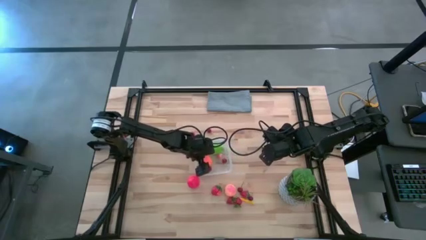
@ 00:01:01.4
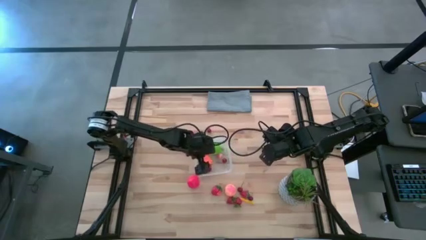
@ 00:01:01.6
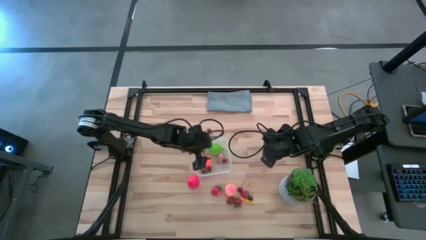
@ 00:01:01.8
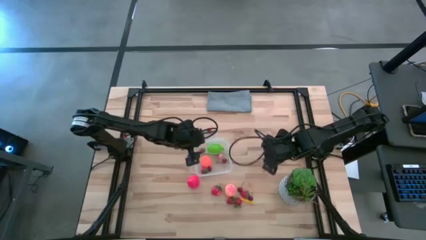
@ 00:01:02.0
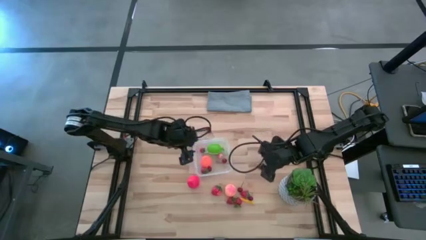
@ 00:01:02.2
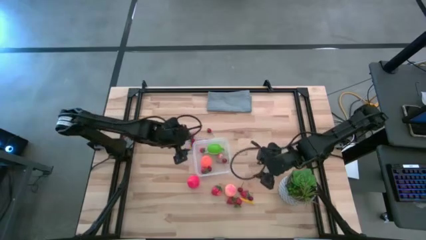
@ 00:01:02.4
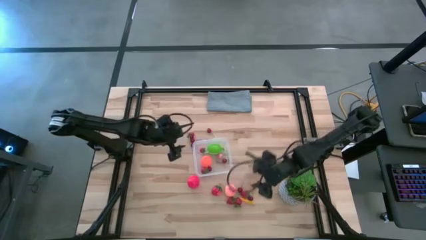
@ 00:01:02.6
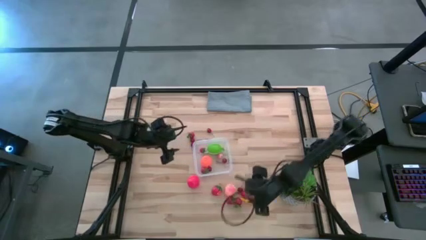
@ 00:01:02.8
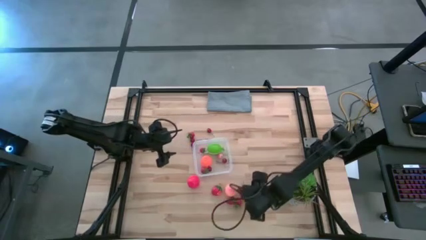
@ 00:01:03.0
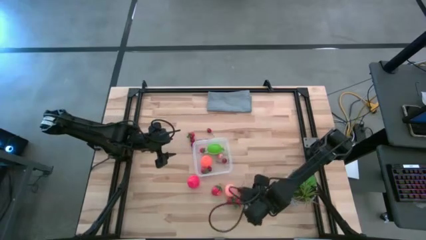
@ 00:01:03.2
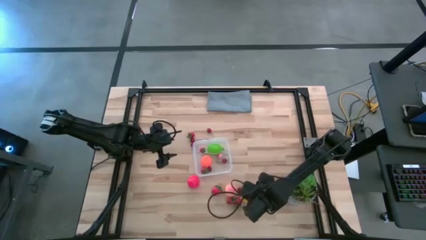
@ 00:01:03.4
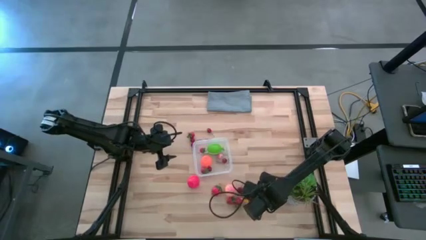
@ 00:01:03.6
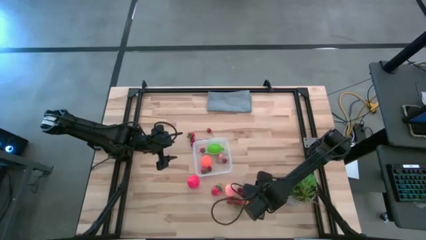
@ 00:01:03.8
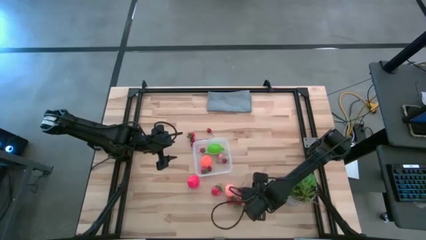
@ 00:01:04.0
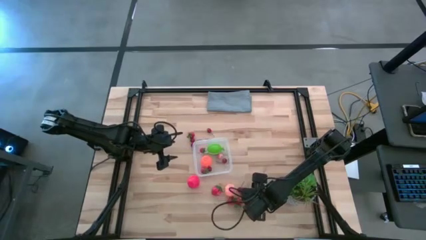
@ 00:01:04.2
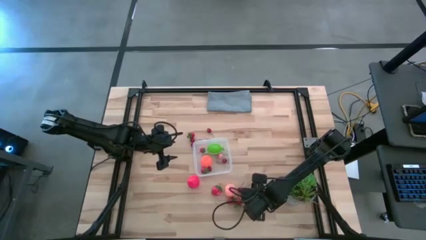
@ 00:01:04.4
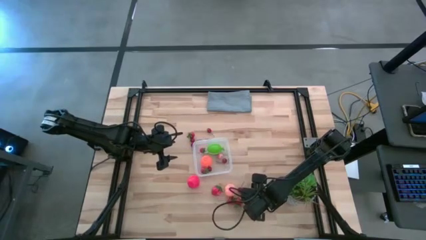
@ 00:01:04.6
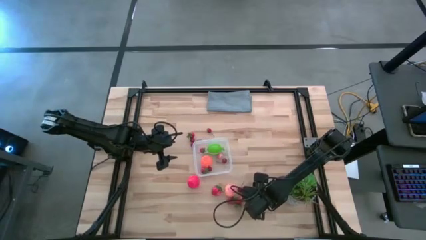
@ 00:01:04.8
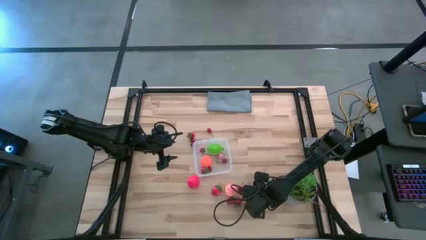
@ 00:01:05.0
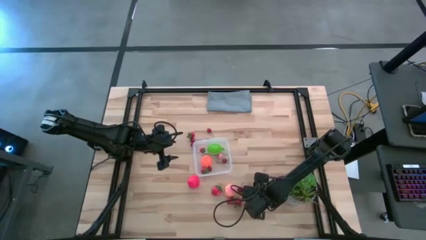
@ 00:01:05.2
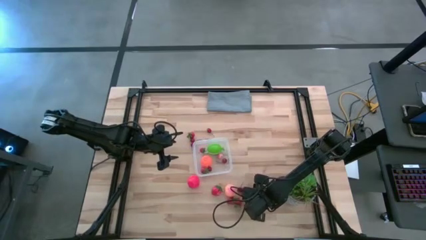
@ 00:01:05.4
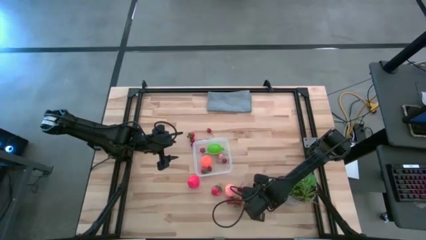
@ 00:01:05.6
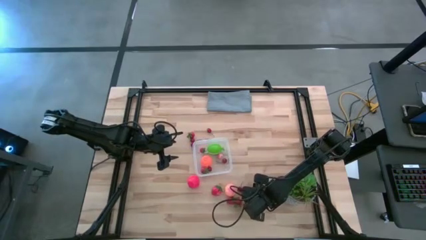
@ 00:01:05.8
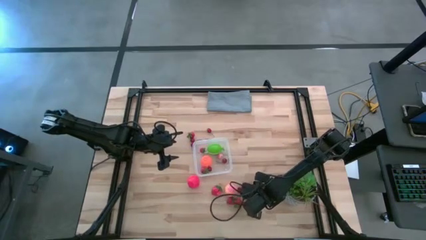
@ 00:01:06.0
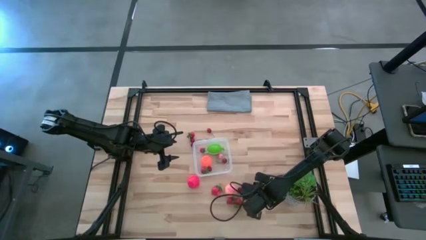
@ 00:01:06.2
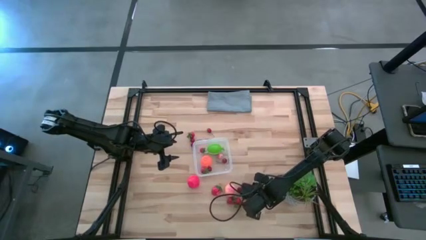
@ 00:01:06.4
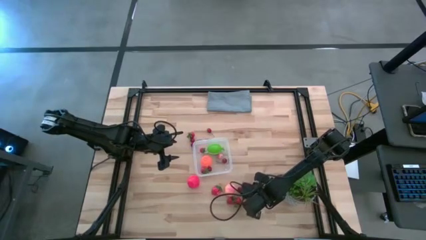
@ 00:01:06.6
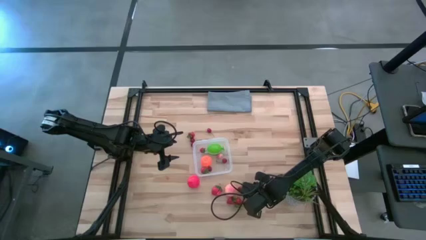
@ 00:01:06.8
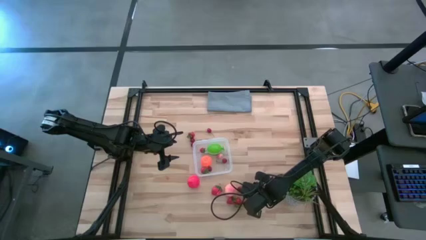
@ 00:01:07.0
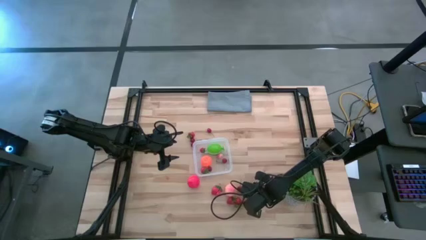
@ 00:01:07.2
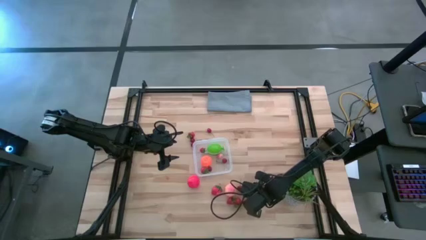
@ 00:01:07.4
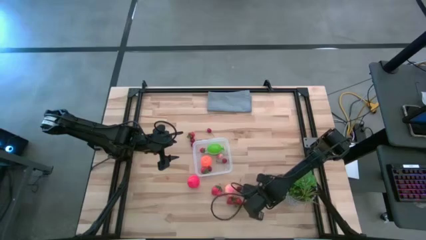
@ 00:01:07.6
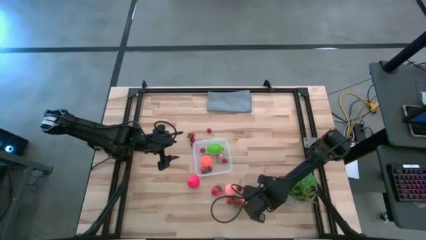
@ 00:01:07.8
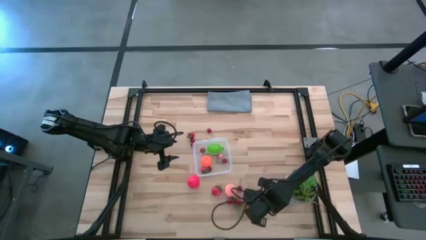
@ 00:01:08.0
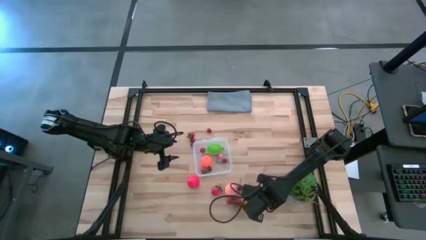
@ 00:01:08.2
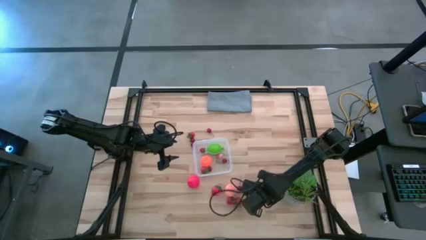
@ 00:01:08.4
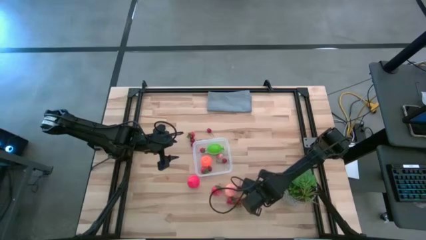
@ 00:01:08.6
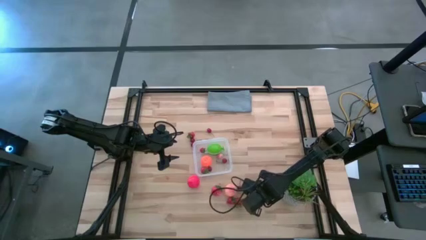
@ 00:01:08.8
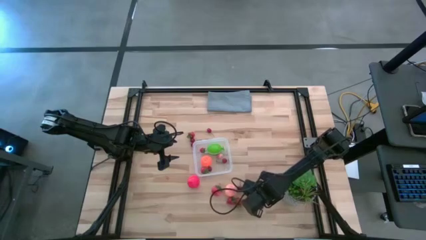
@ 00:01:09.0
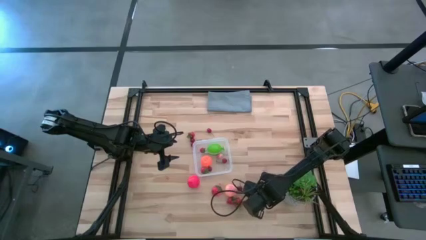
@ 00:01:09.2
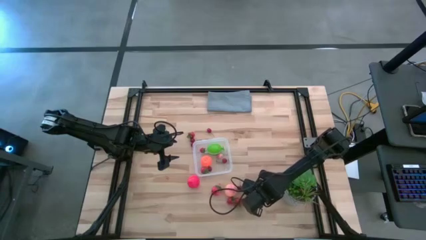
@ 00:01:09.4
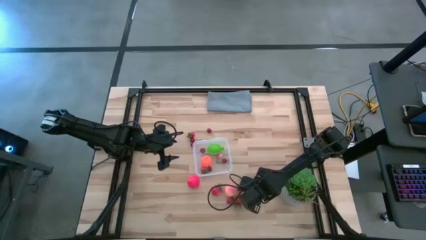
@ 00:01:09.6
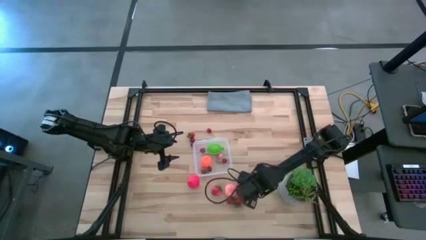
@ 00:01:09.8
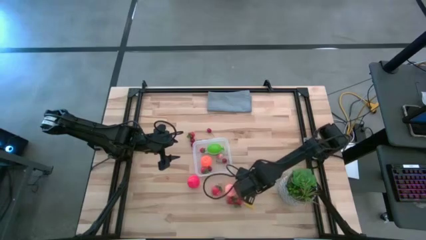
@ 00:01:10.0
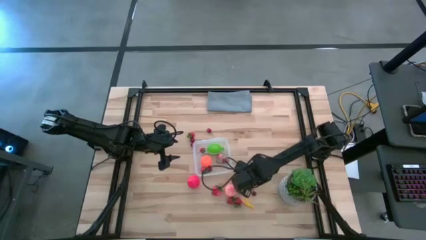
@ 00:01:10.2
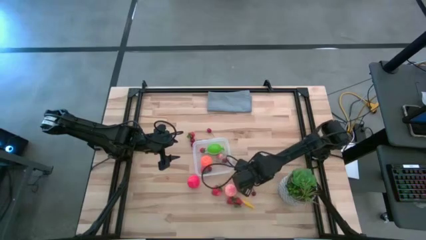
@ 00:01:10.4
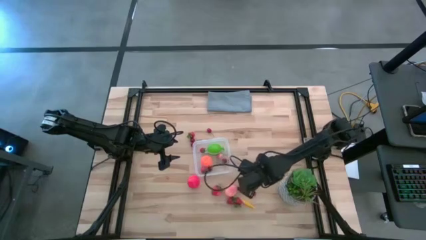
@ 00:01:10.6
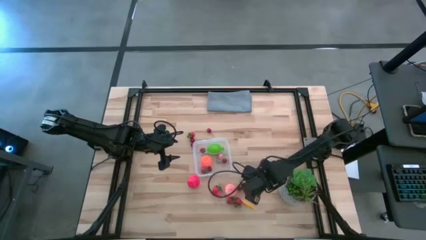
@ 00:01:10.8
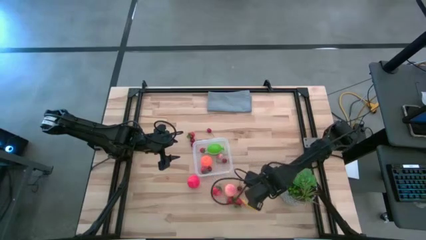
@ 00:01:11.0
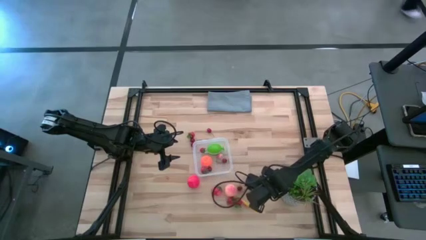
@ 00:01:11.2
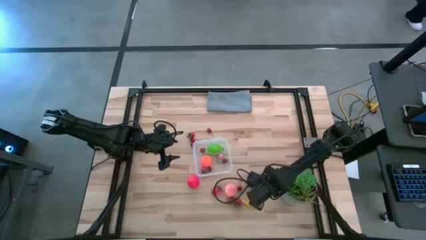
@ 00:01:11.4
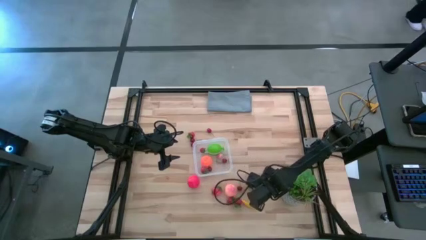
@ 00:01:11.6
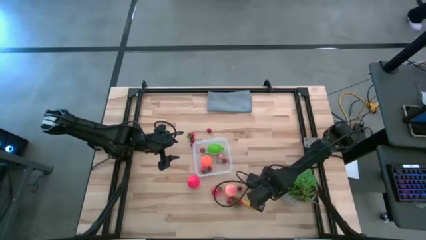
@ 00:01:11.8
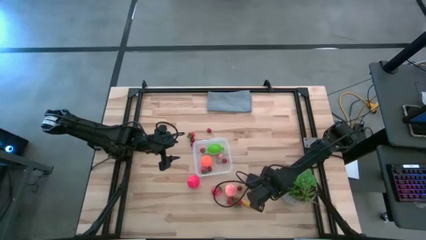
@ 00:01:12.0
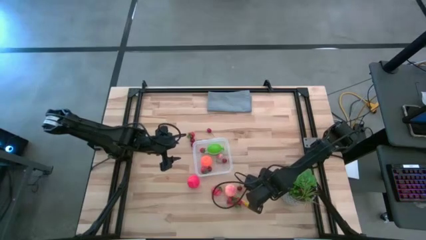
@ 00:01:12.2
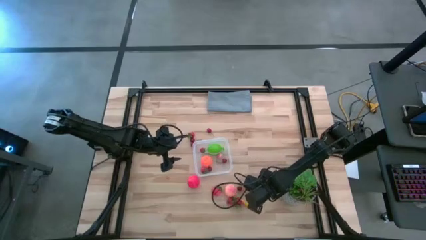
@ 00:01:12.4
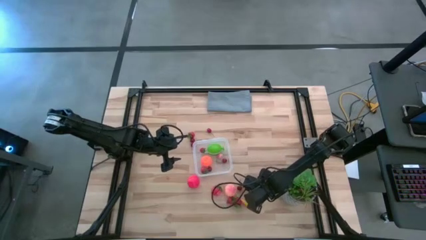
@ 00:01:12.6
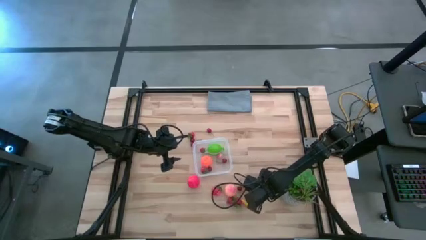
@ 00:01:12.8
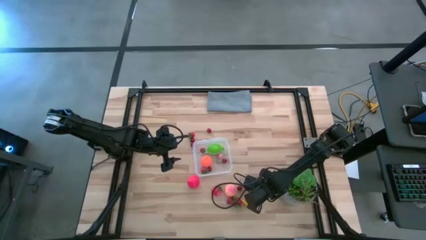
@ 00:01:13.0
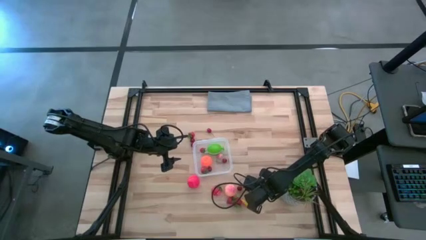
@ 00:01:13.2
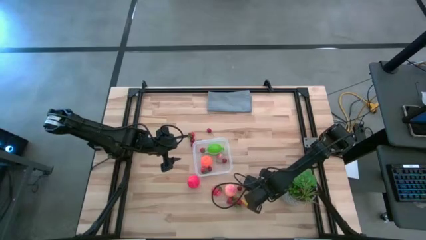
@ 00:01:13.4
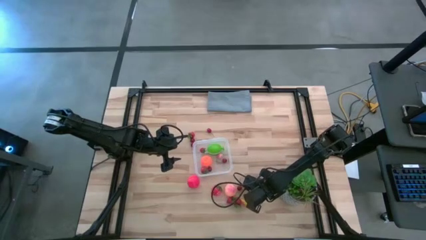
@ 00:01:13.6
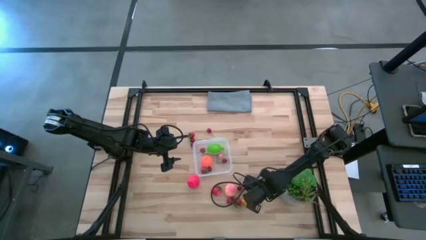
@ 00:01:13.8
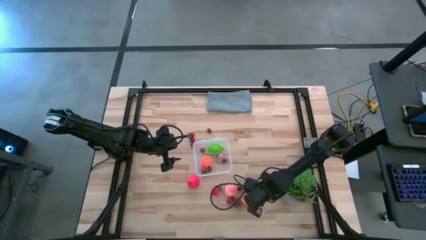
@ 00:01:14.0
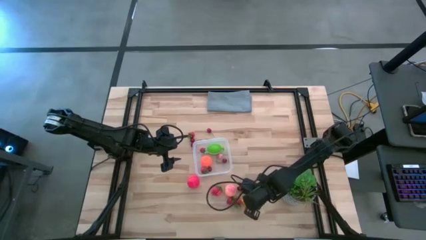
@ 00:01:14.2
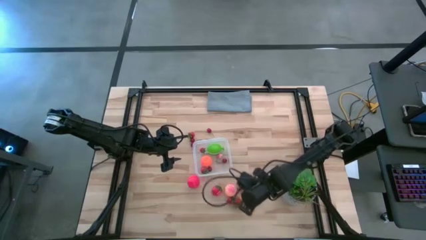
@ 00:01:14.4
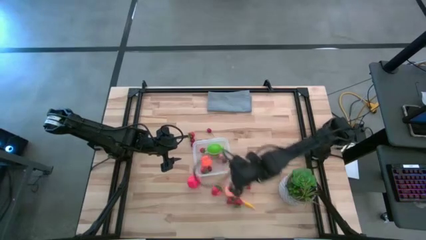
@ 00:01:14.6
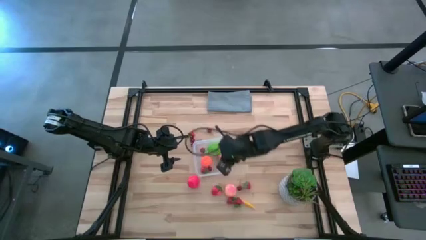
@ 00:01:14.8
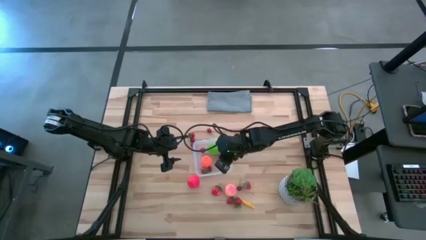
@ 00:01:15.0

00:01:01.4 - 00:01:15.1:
Task: Pick and placing Produce into tupperware
Put the red cherry into the transparent container

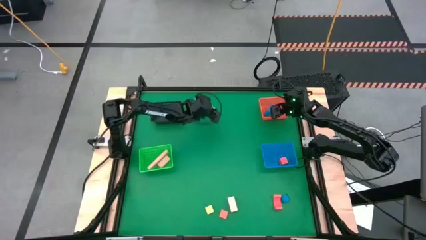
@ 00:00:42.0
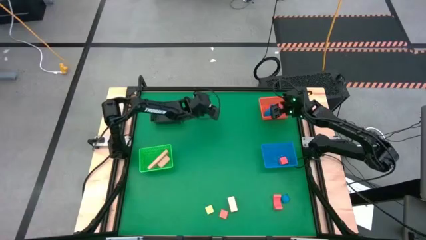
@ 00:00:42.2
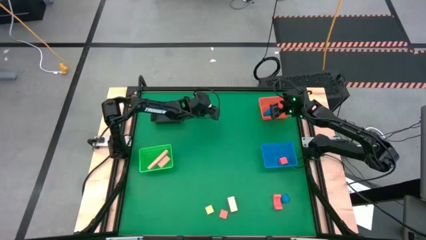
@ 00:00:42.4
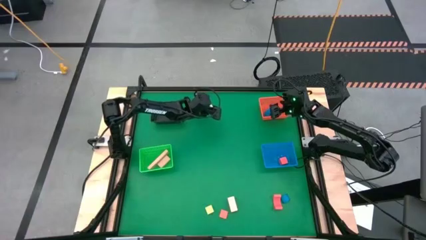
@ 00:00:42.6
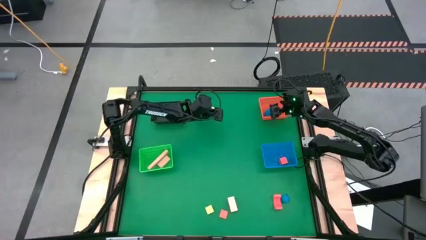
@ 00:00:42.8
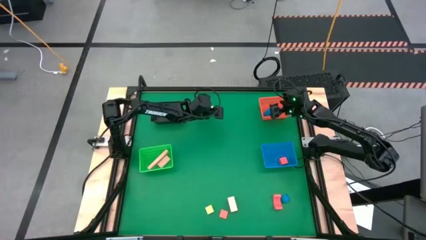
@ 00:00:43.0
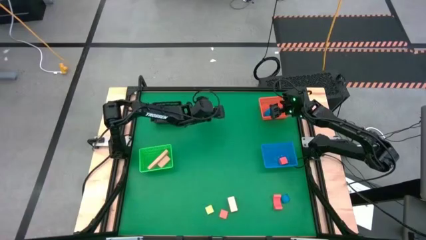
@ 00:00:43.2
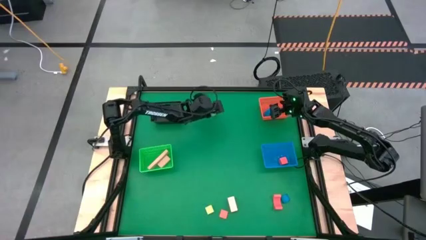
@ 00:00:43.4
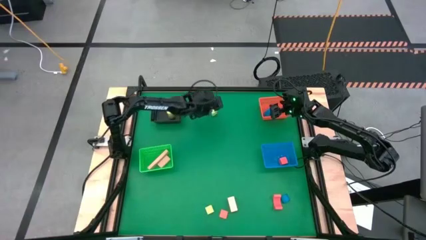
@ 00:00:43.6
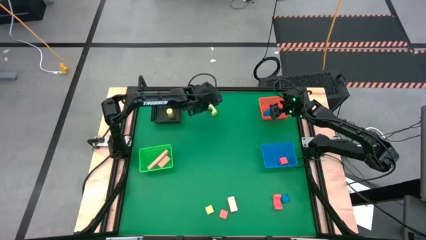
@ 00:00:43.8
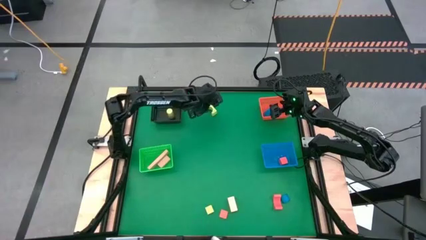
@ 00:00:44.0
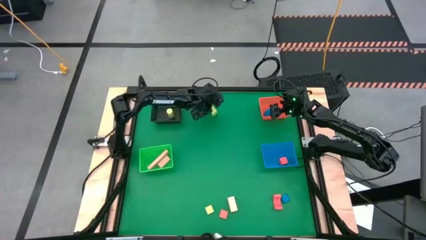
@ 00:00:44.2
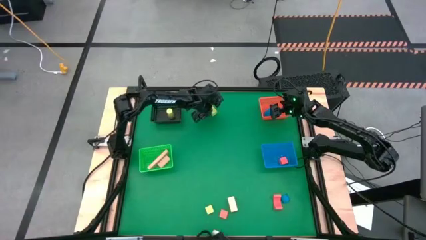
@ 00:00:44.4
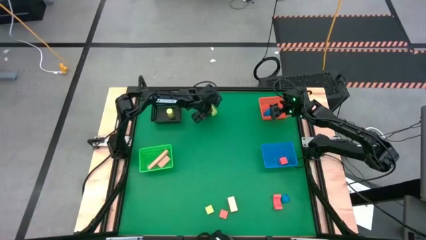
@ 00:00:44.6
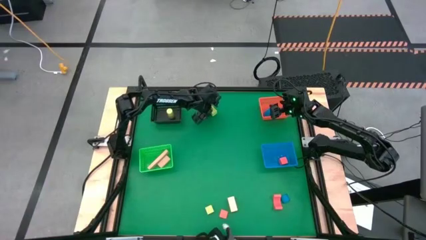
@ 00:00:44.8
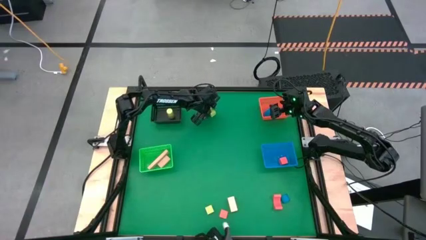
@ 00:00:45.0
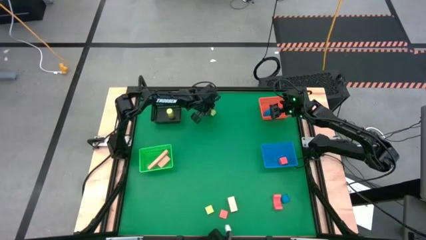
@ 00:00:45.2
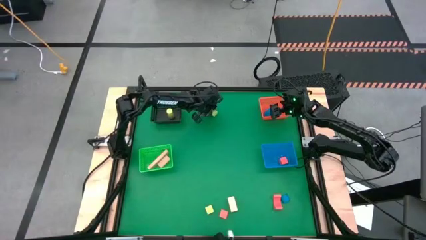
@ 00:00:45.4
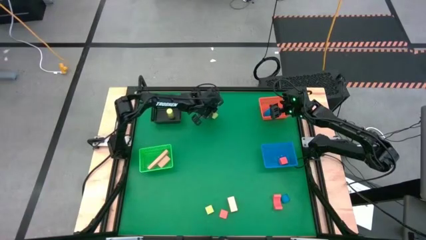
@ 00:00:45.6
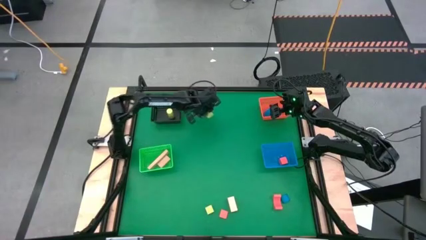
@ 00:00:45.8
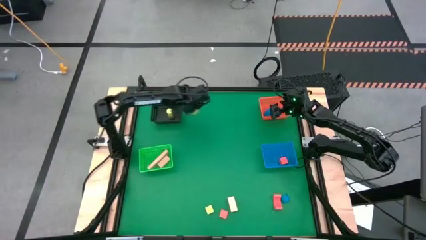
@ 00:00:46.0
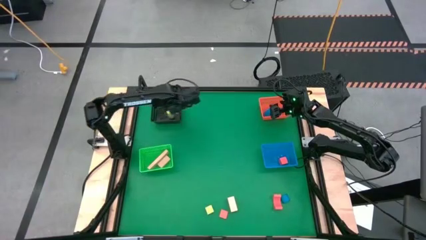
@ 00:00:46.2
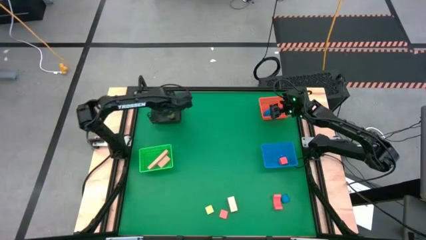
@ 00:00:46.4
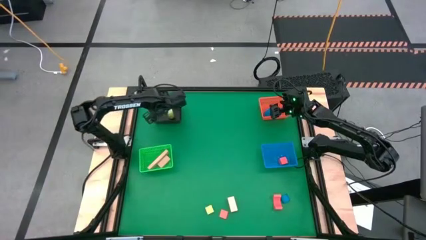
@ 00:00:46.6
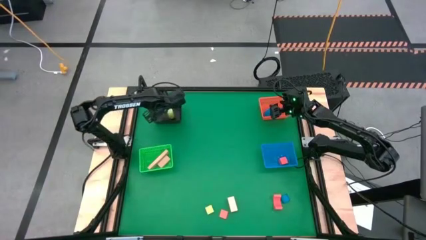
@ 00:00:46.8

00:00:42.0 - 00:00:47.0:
Task: Sort & place blocks by color
Put the yellow green block into the black bin
